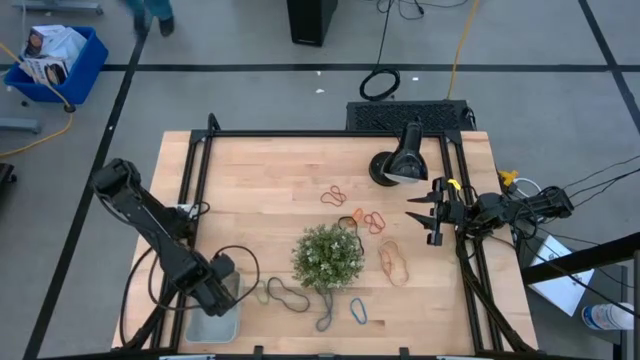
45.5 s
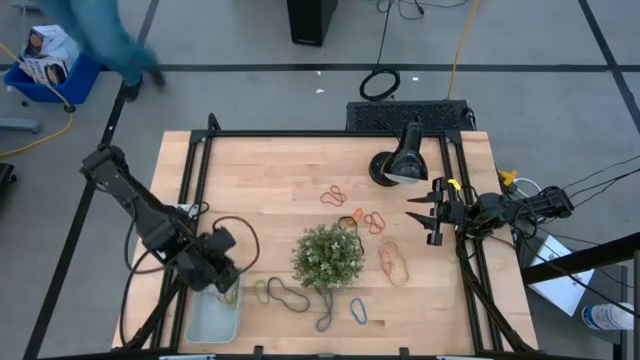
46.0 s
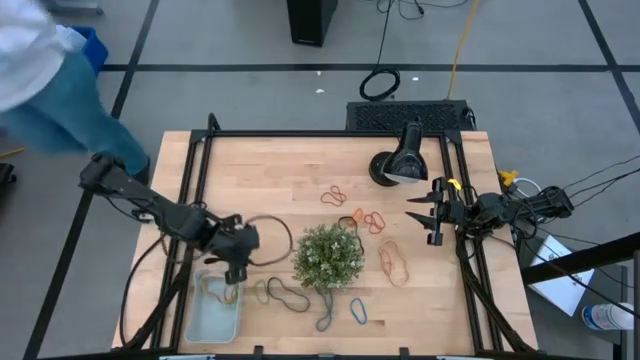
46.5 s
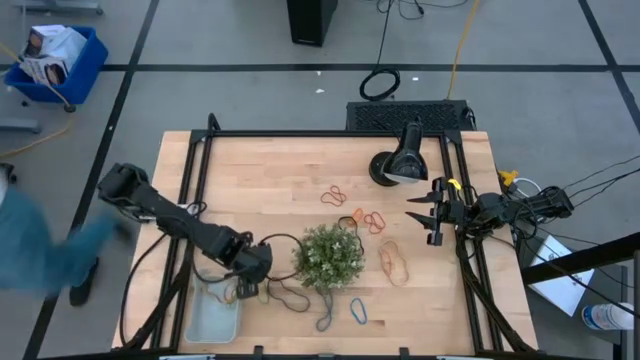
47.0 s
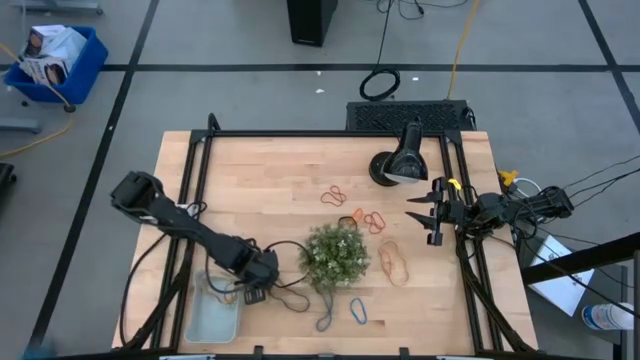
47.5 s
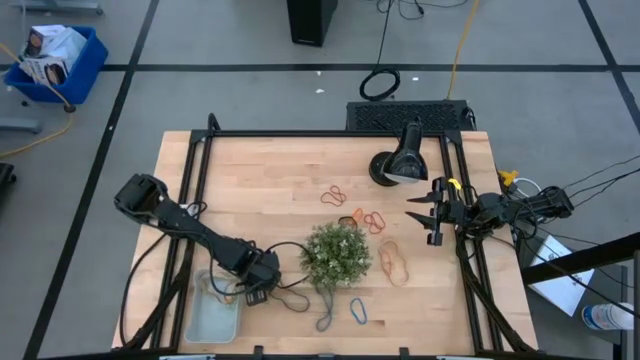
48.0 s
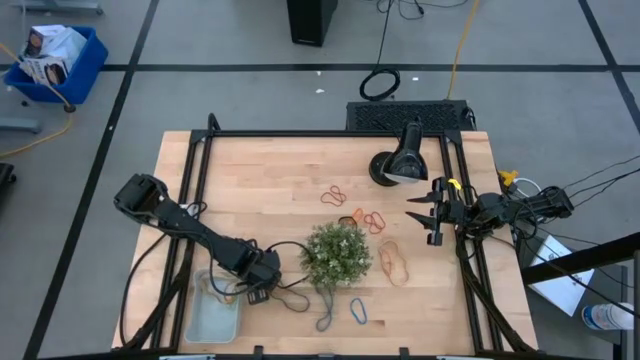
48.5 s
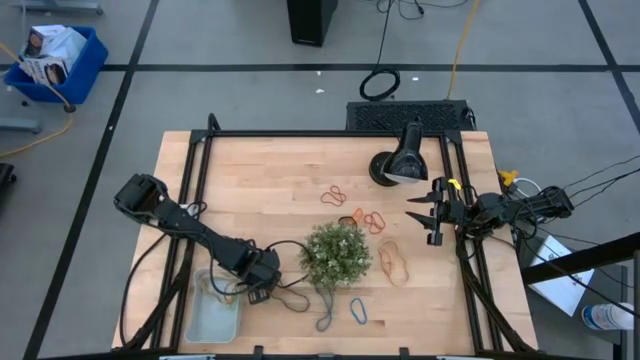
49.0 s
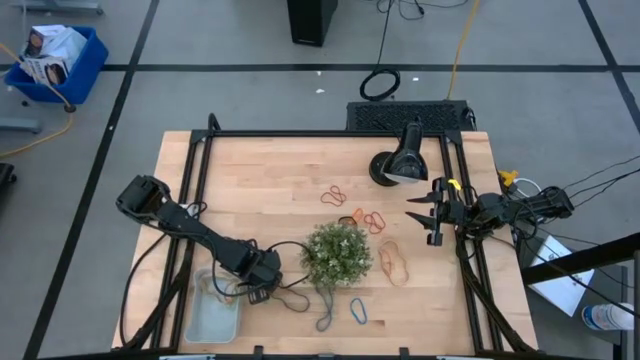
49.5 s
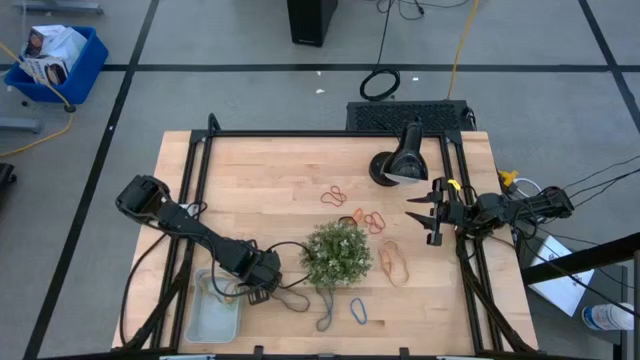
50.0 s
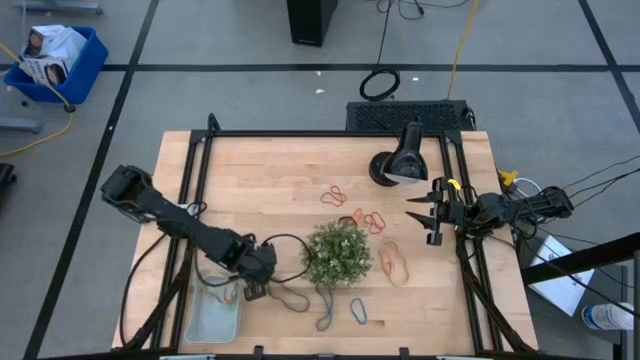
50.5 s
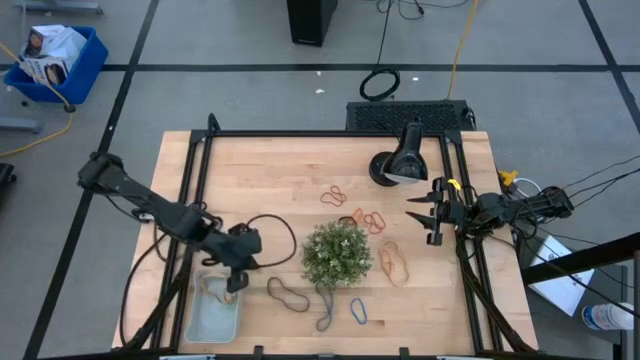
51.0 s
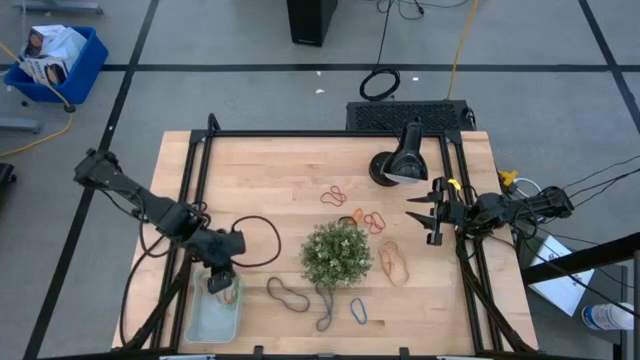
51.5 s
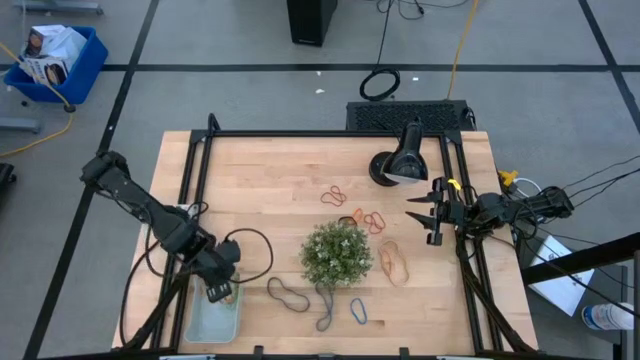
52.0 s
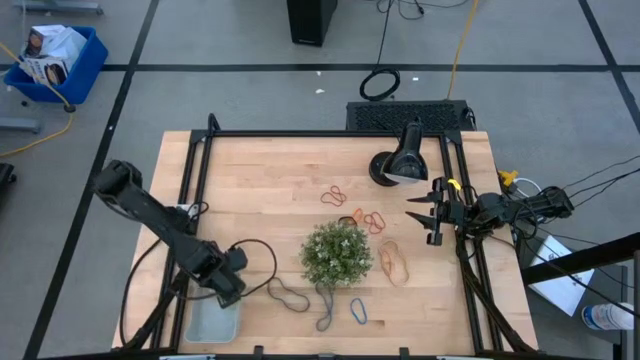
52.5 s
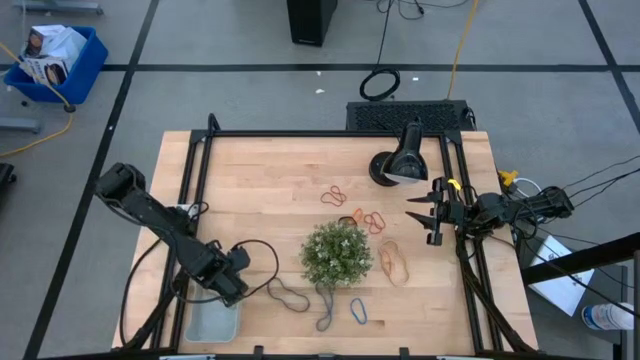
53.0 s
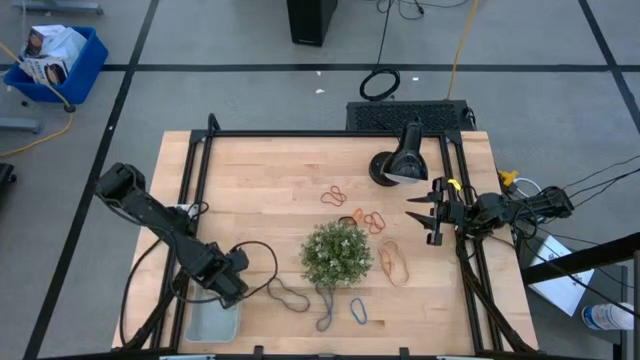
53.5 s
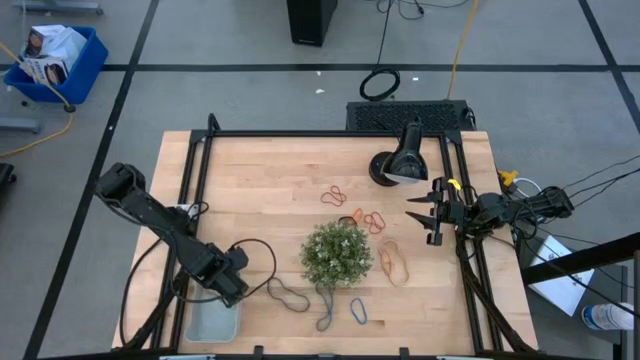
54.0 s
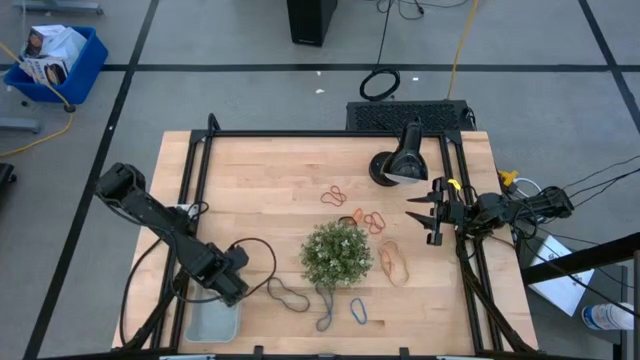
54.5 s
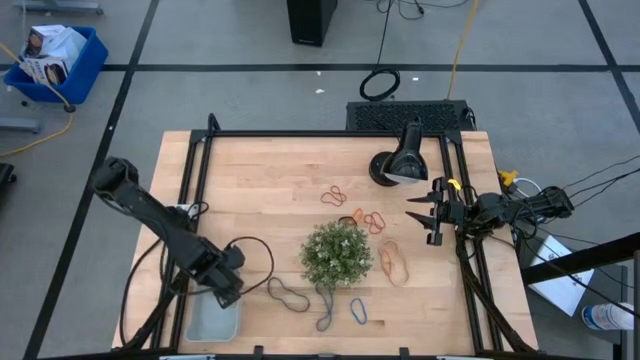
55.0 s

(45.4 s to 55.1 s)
Task: Pick and place rubber bands into bin
Put the green rubber band into the blue bin

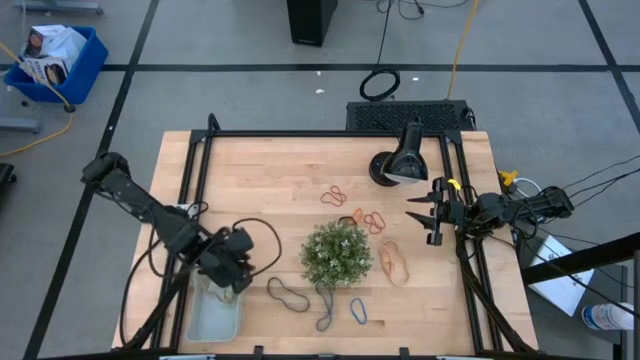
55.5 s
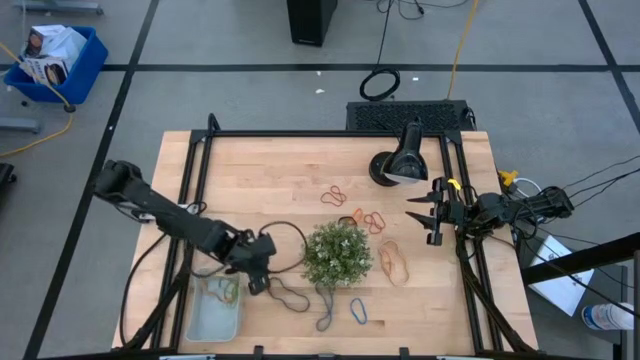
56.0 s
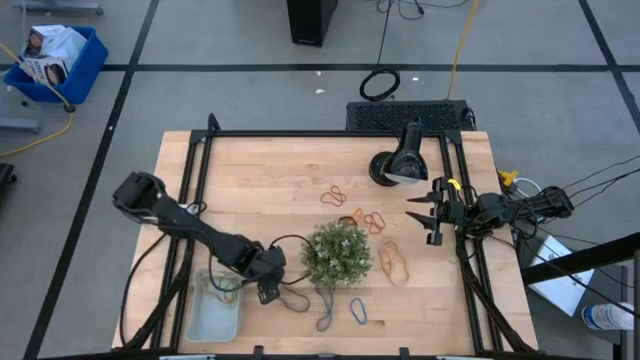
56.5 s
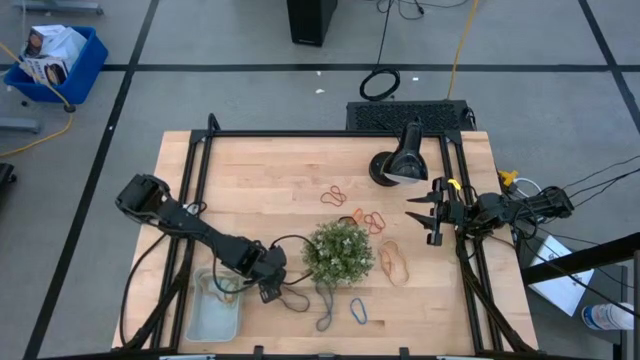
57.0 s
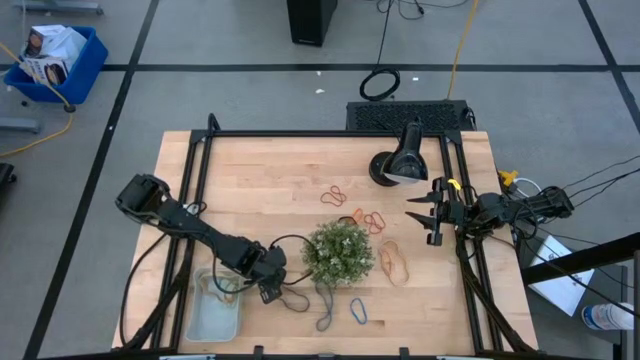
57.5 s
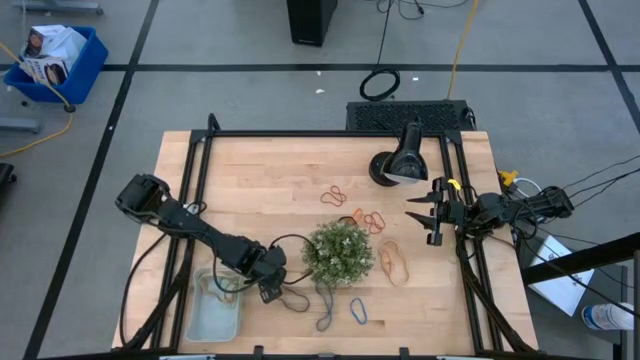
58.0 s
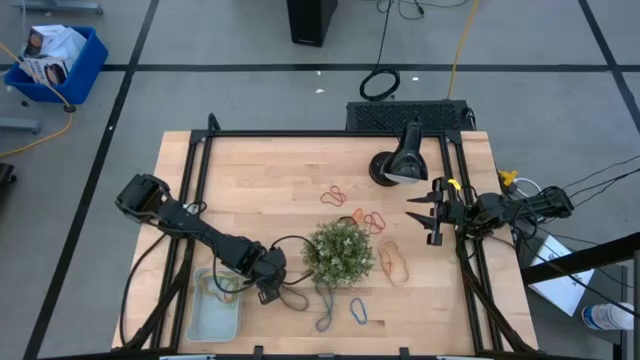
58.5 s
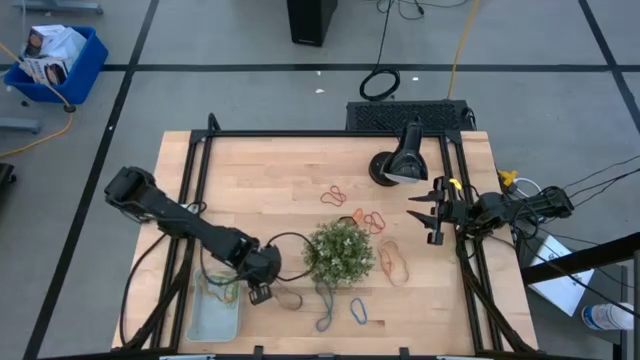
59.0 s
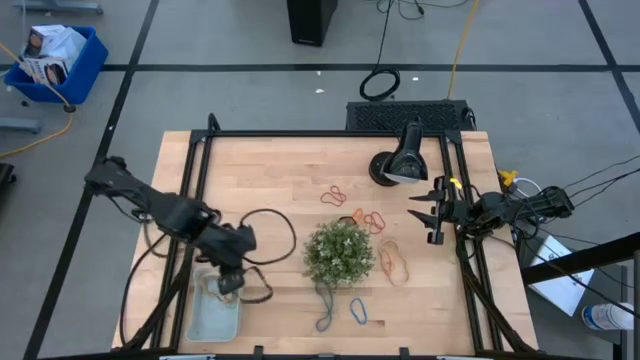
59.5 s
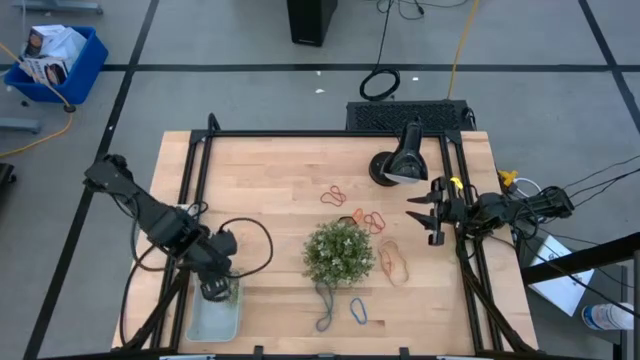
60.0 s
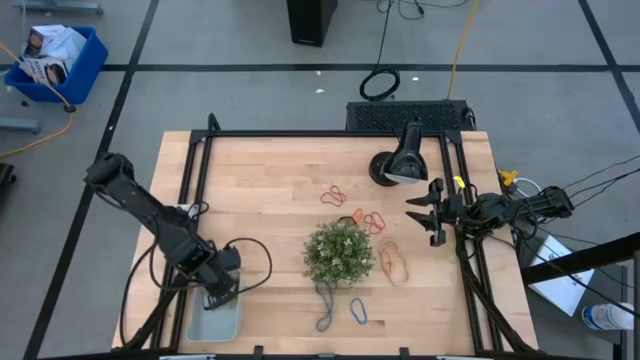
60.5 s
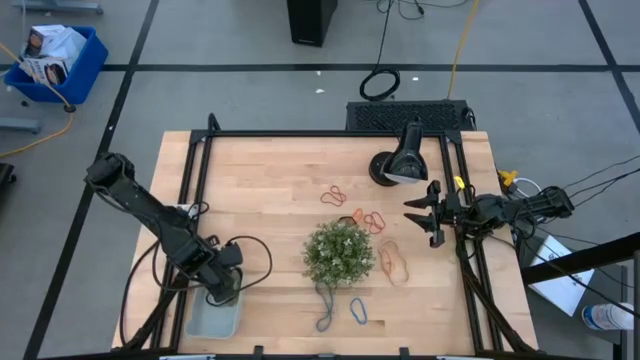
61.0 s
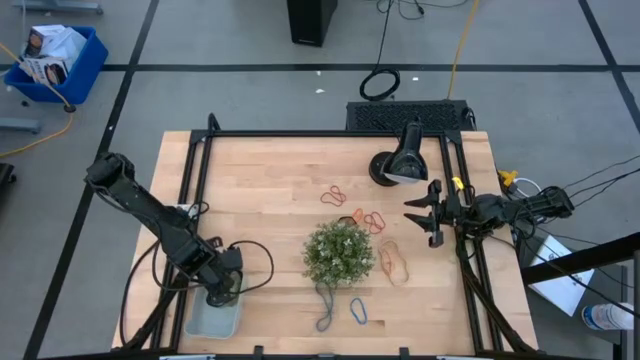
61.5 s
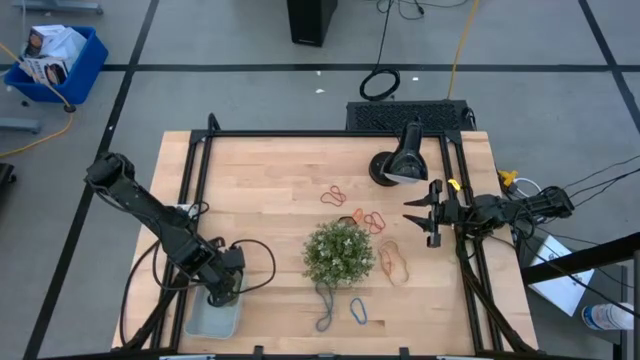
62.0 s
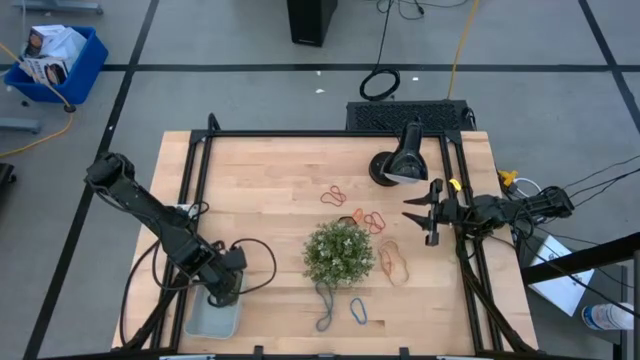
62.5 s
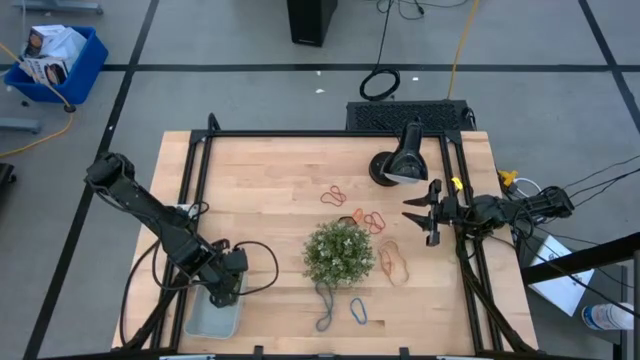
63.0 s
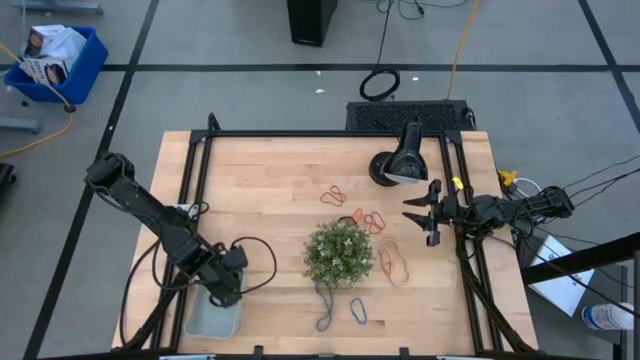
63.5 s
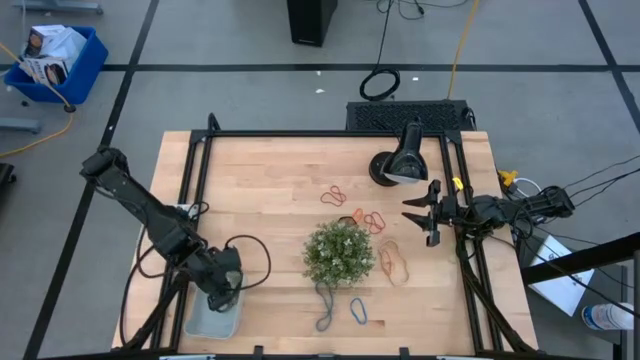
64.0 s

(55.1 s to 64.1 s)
Put the bottom black rubber band into the blue bin

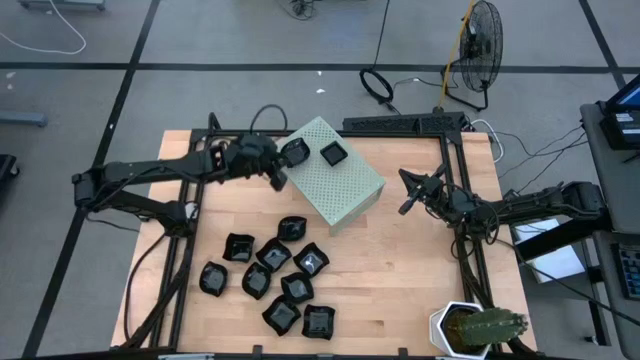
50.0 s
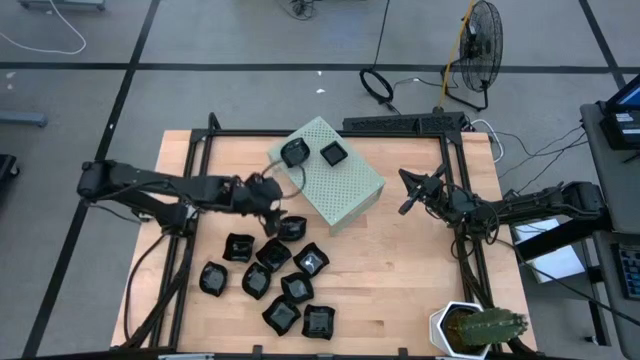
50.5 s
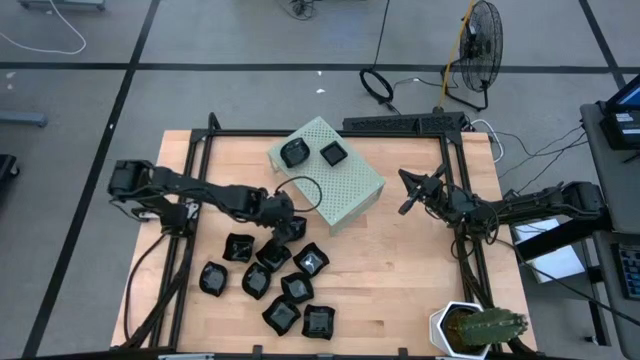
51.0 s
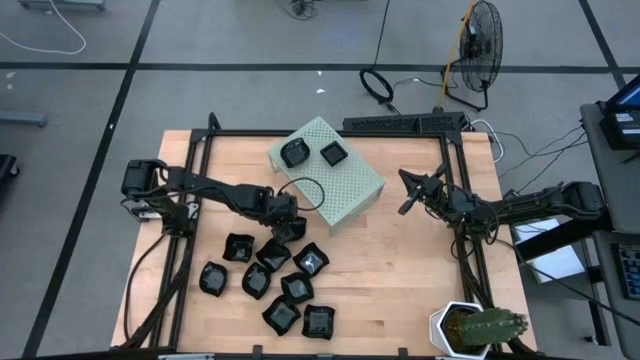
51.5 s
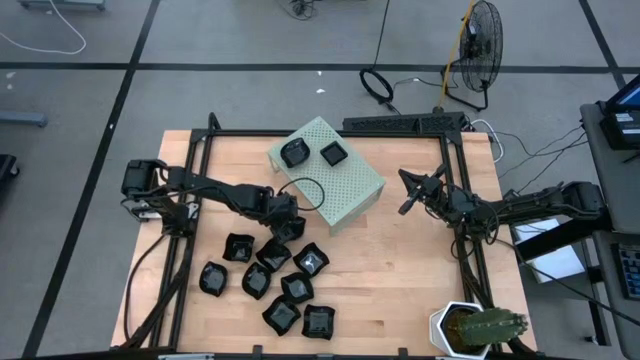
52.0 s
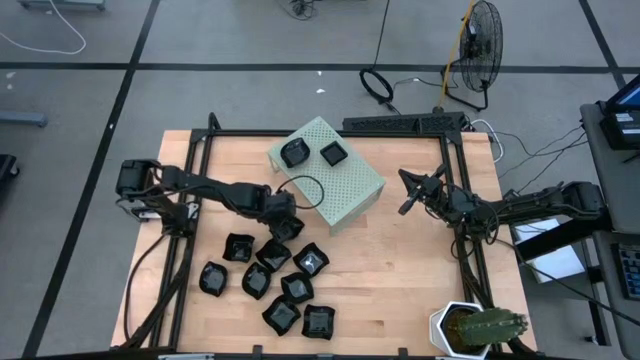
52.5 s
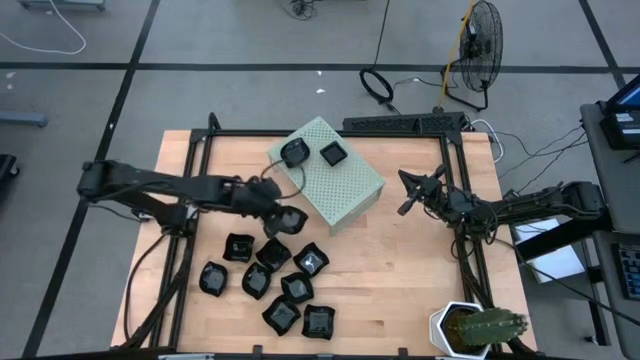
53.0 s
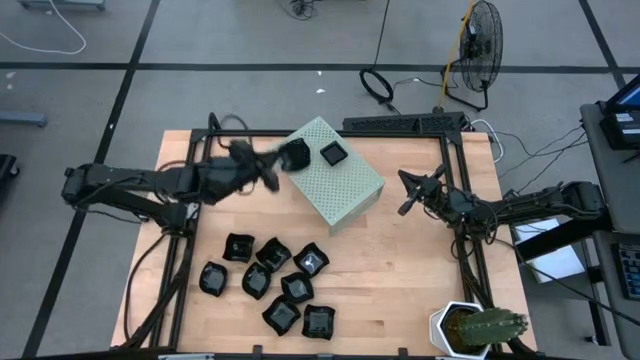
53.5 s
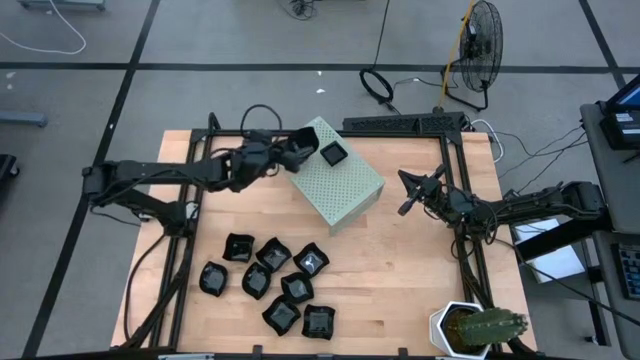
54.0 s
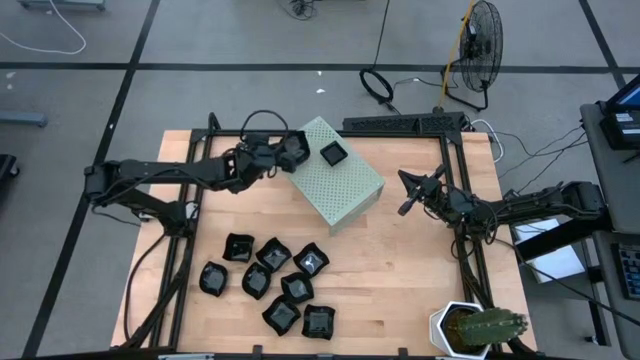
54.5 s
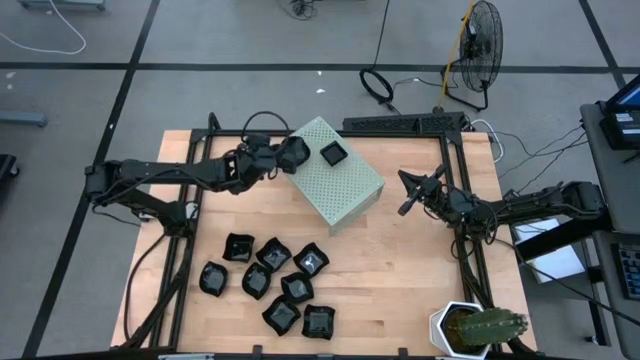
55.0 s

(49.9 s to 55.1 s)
Task: Pick & Place Mini shaped plates
Stack the leaf-shaped plate on top of the other leaf-shaped plate on the shelf
